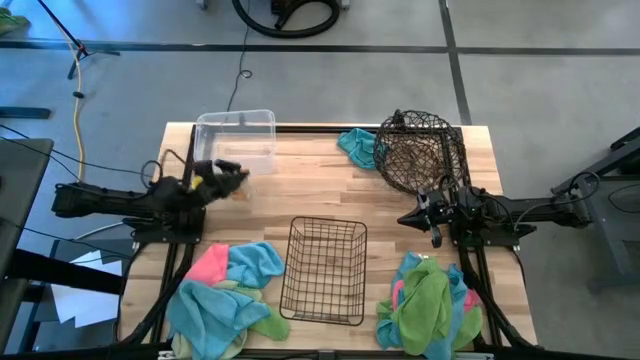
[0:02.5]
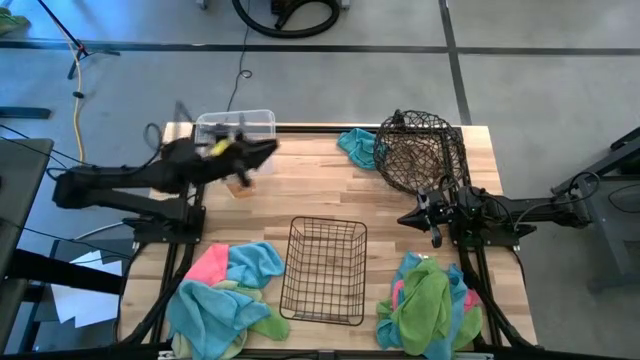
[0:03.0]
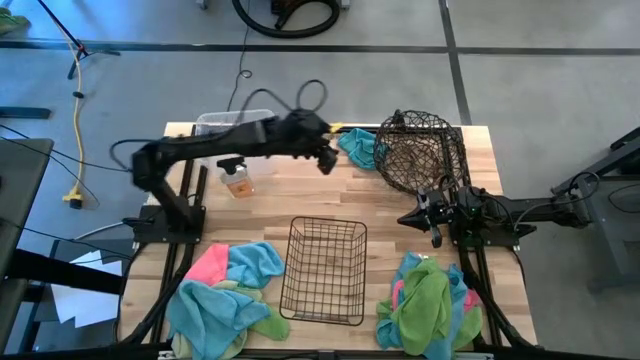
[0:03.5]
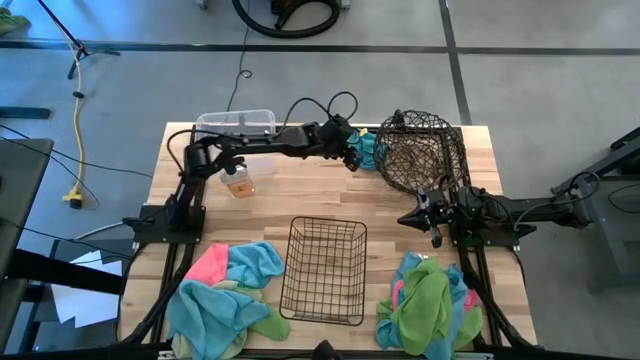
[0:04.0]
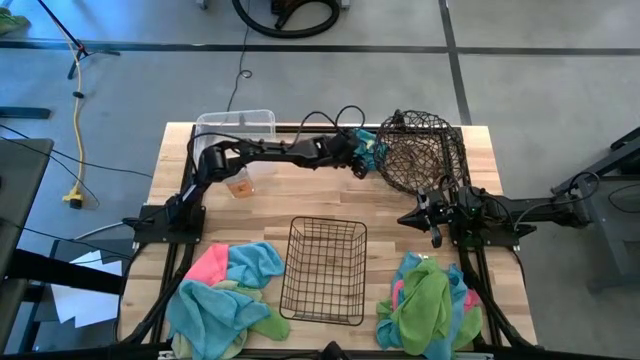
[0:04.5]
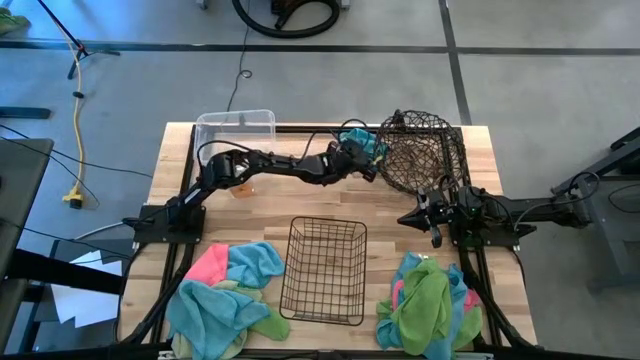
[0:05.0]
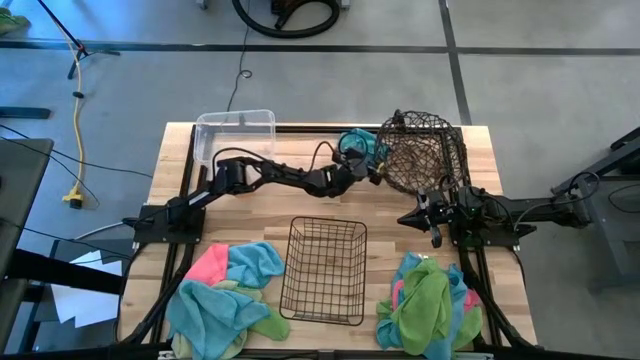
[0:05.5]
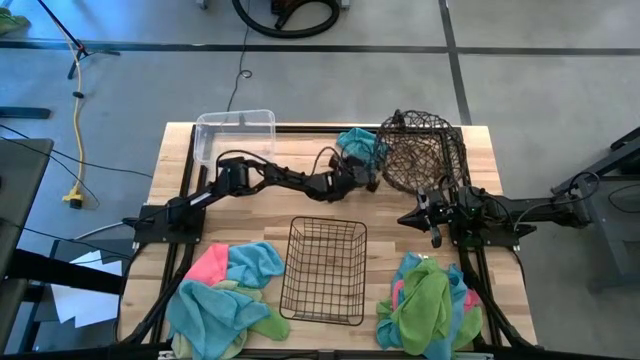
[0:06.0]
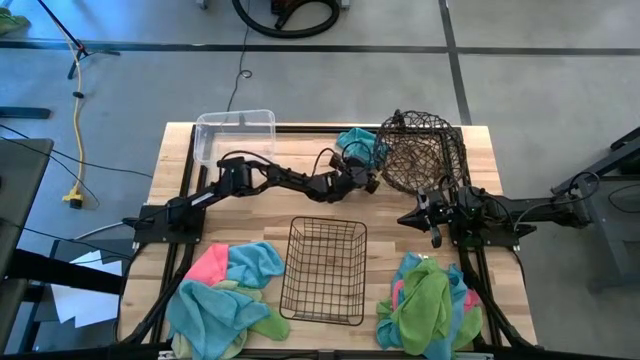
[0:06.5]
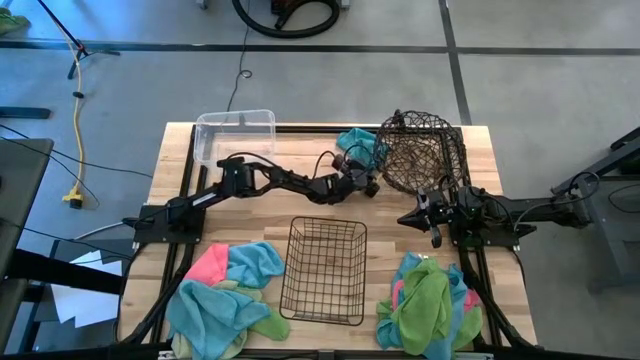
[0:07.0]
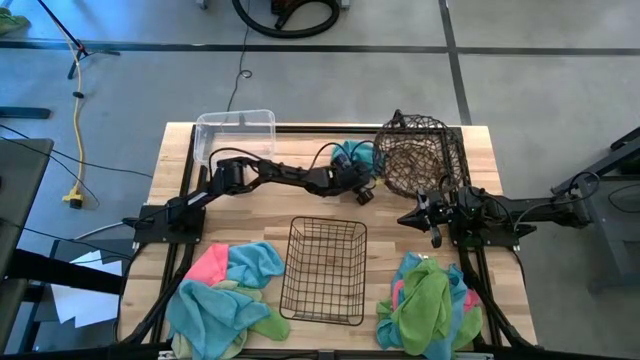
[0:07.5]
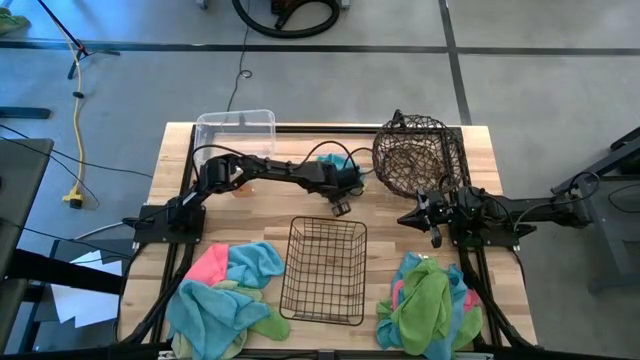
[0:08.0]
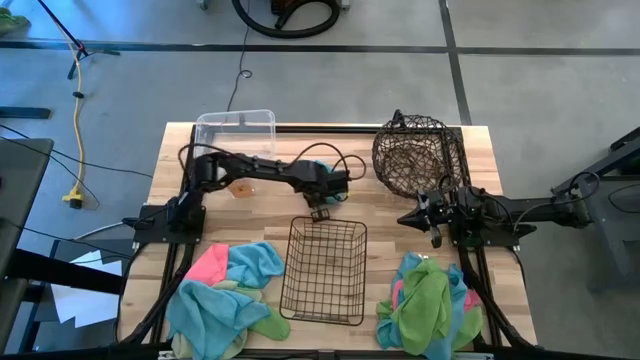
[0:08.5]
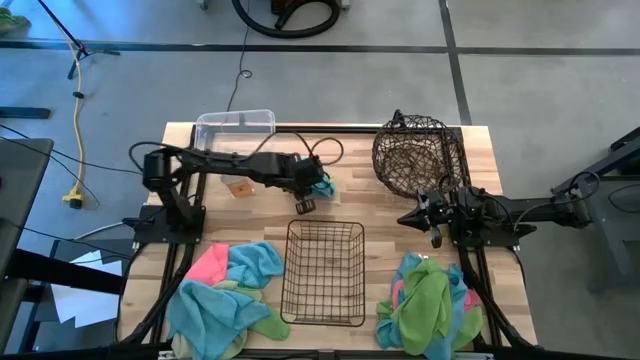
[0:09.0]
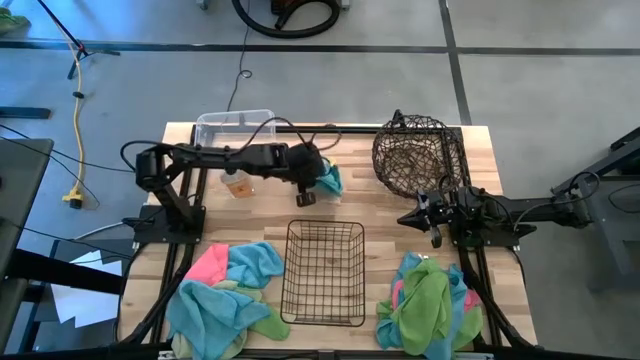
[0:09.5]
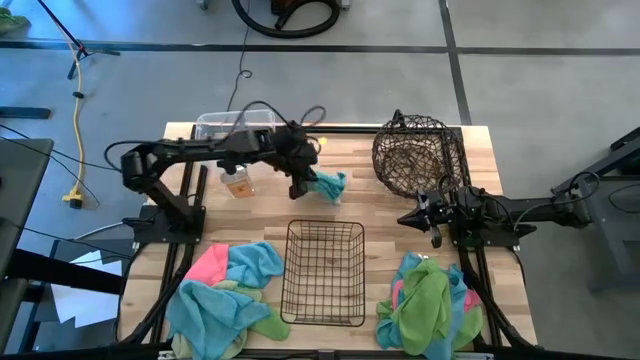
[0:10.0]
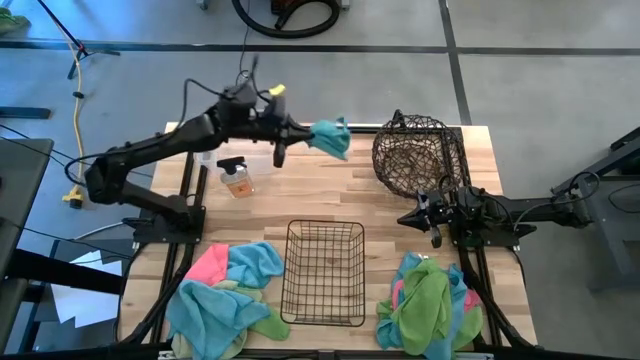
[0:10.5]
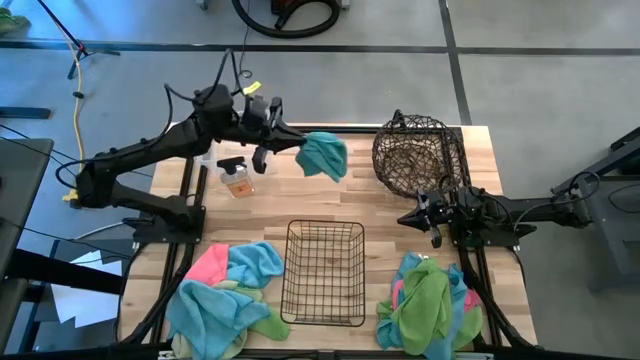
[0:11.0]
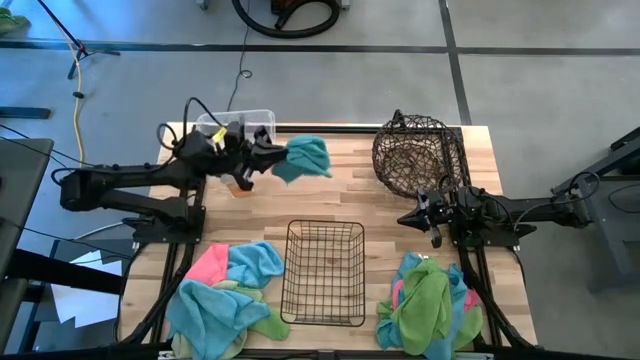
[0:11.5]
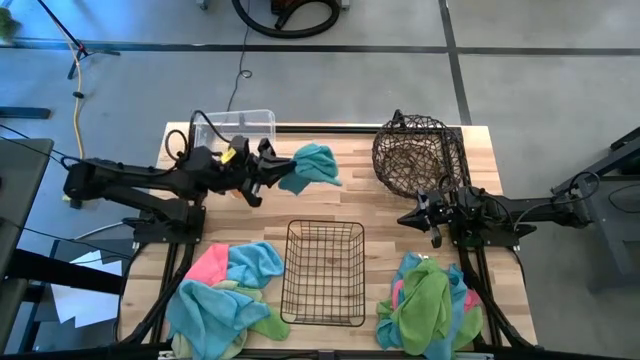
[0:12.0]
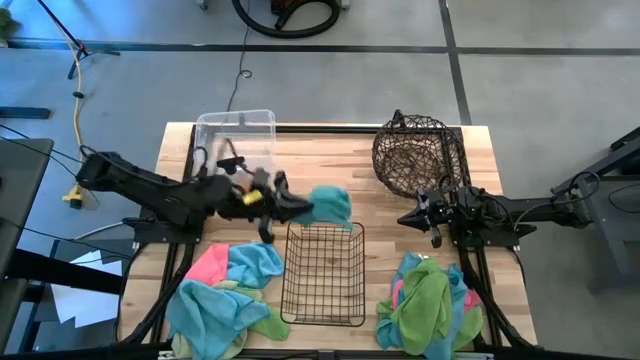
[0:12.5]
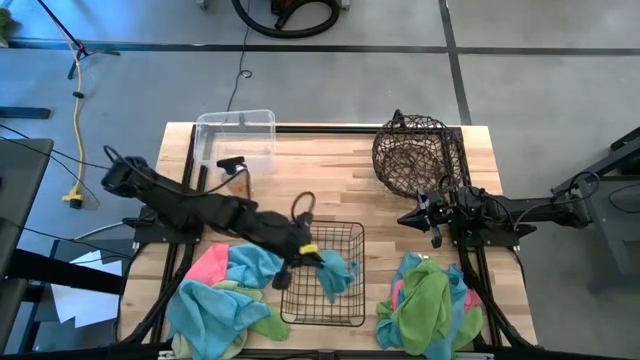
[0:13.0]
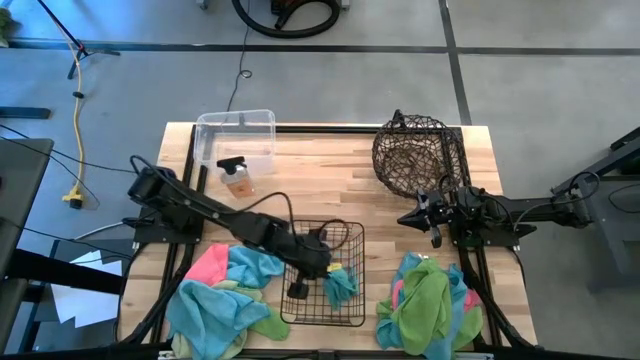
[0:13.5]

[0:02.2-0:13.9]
Task: Sort microfiber towel by color & place in baskets
Put the top blue towel into the black bottom basket

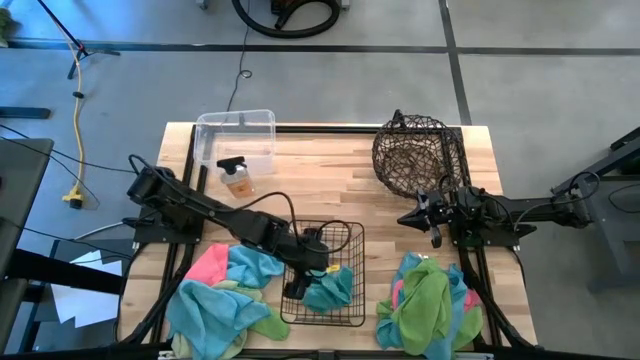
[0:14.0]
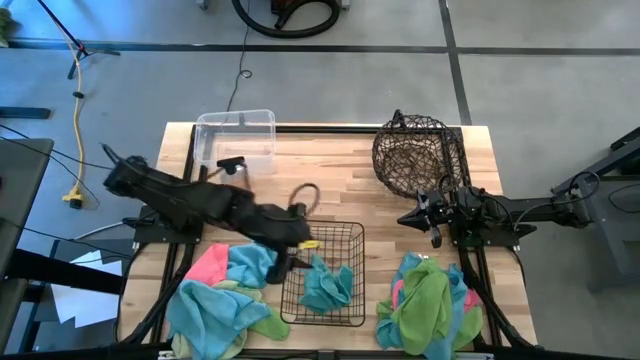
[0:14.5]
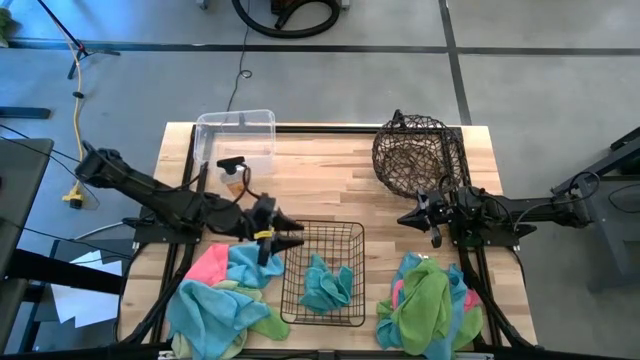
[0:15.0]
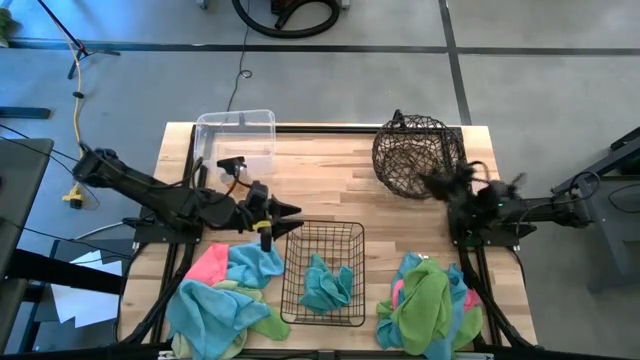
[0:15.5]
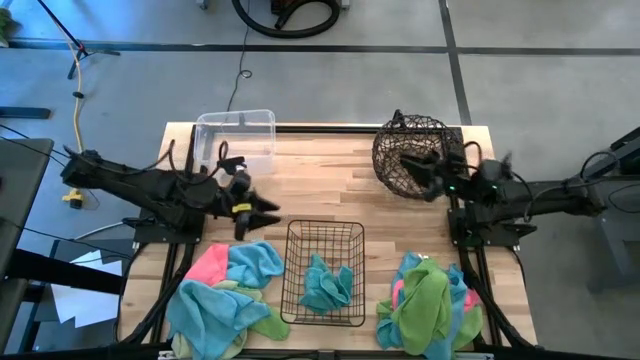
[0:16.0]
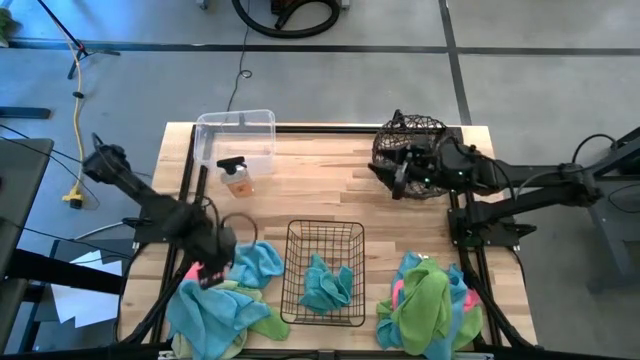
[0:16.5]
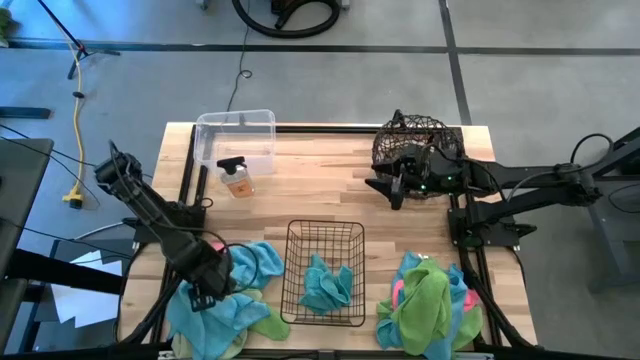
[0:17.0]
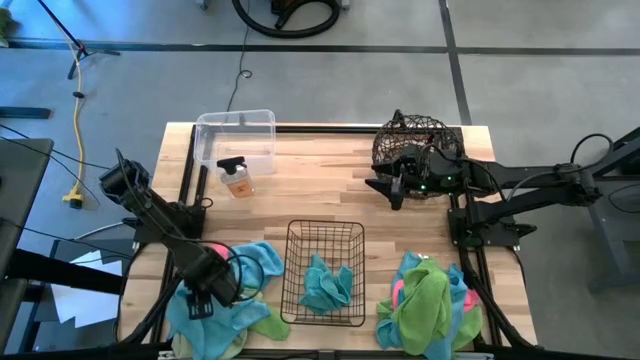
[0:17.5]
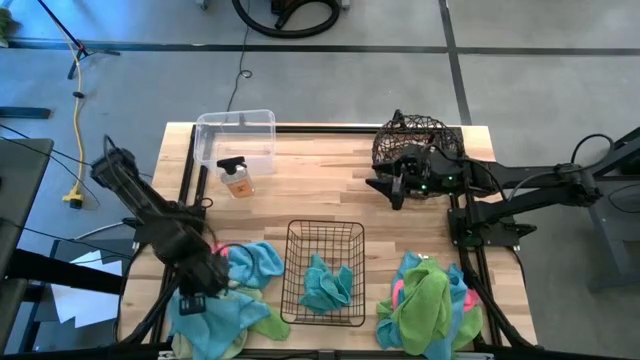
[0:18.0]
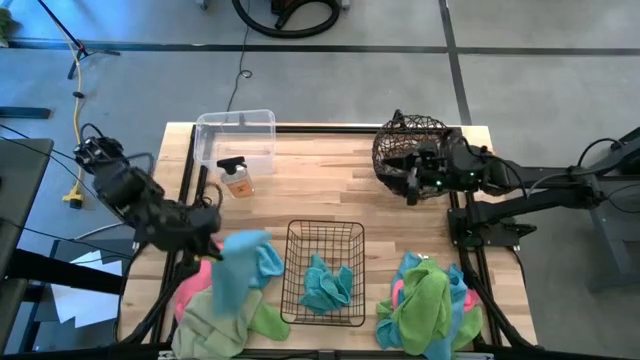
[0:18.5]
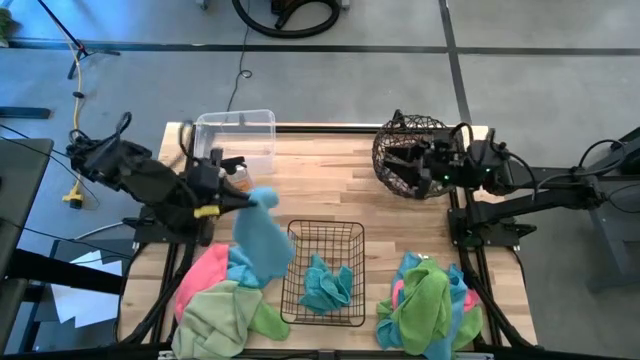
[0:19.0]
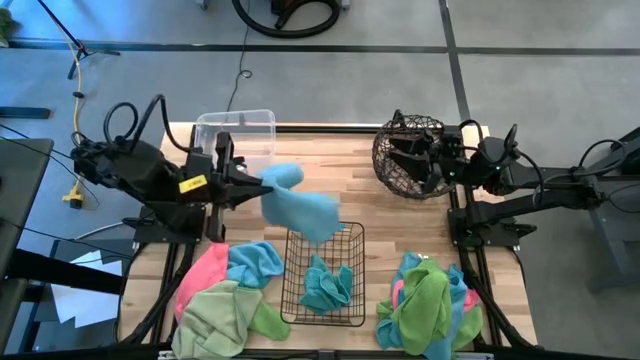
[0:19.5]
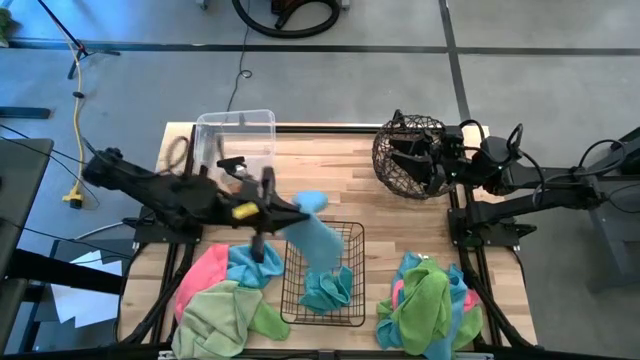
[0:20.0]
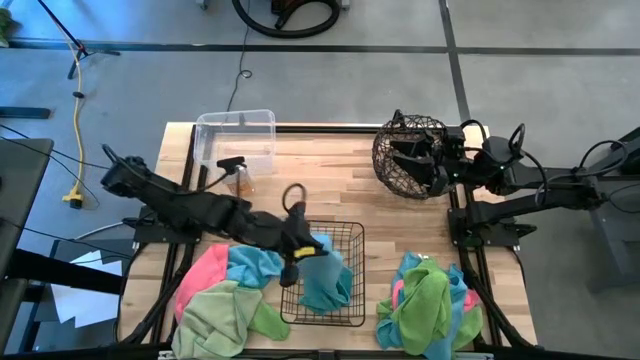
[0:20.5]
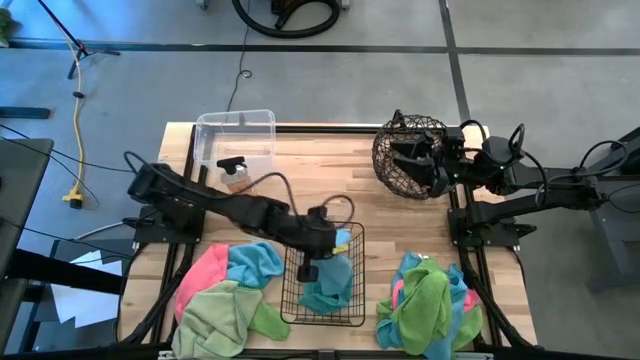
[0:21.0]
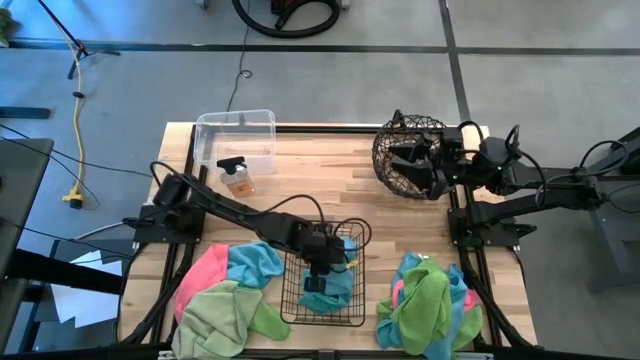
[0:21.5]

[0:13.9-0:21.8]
Put the blue towel into the bottom basket

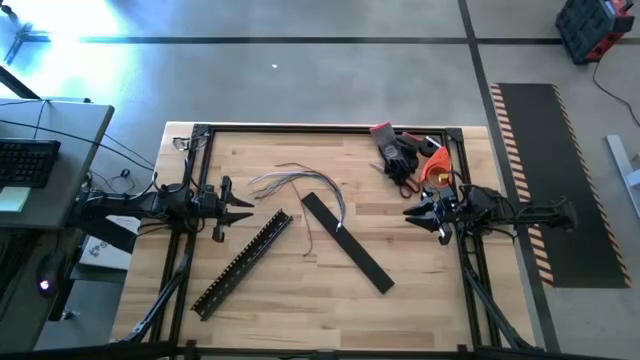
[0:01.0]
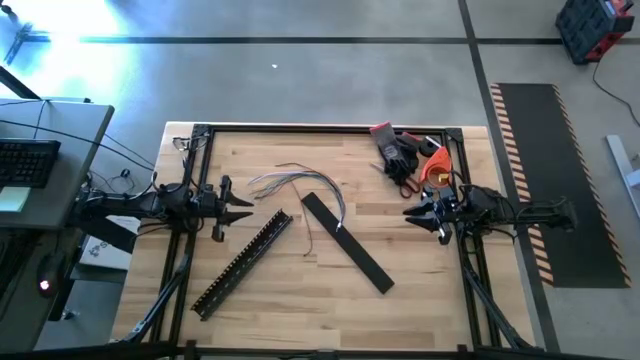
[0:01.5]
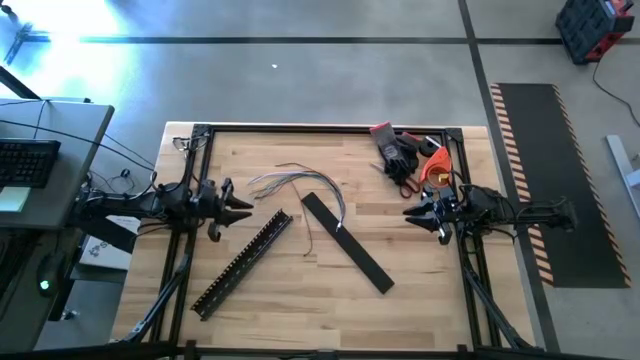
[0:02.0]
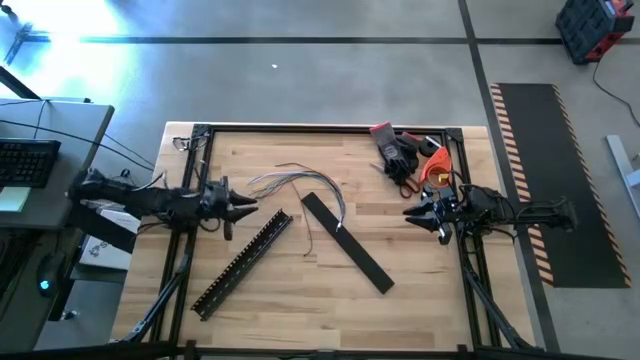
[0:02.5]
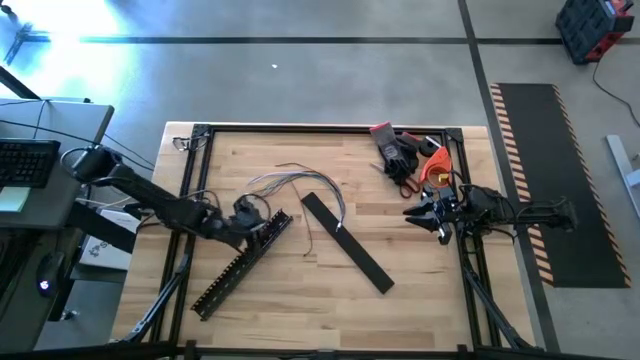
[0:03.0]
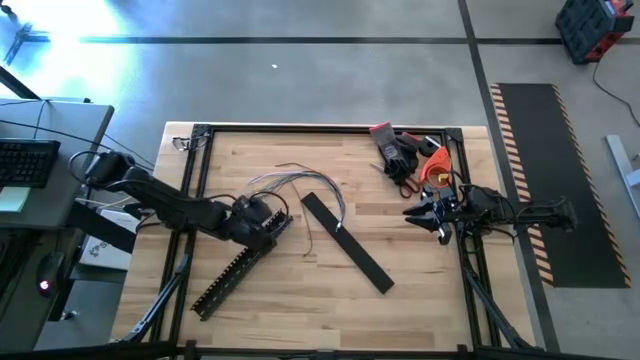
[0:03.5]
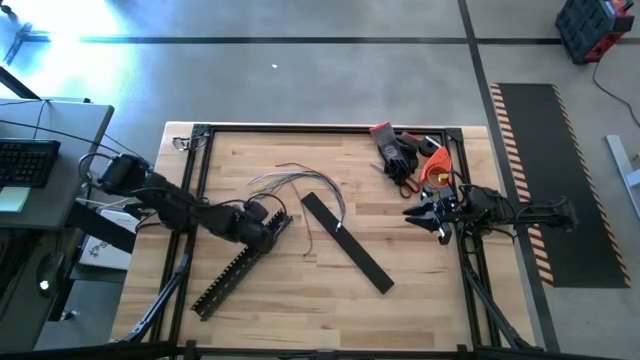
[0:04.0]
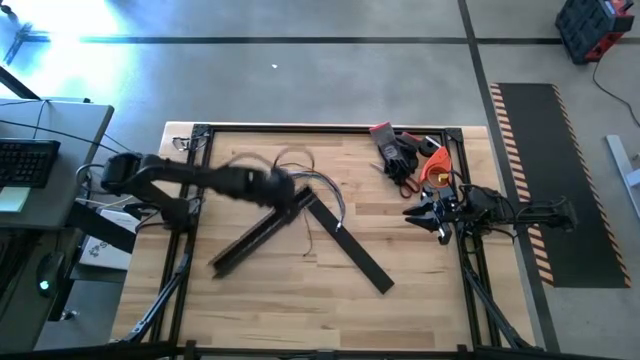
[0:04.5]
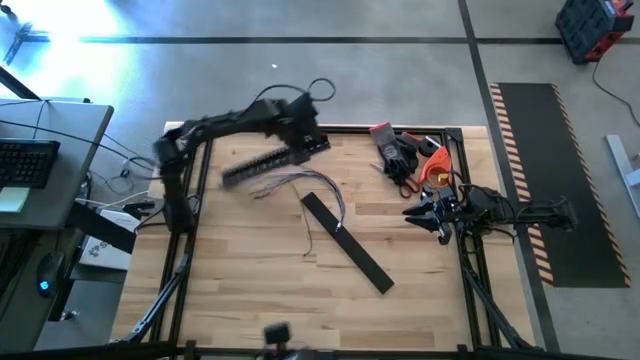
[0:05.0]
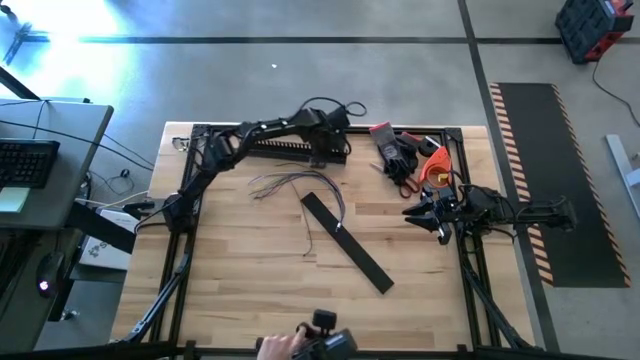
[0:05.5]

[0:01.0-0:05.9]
Task: Ziptie cables
Move the black cable duct to the top center of the table
